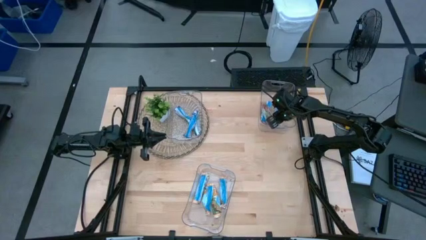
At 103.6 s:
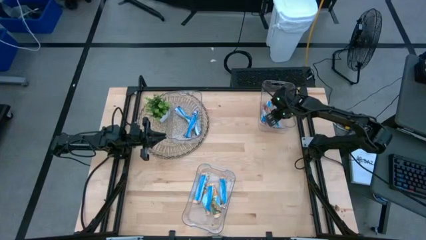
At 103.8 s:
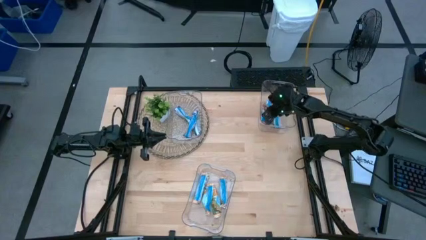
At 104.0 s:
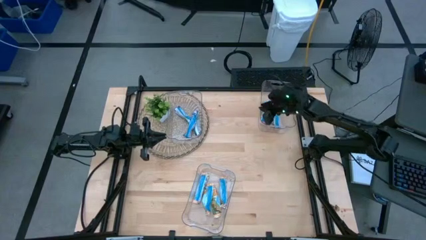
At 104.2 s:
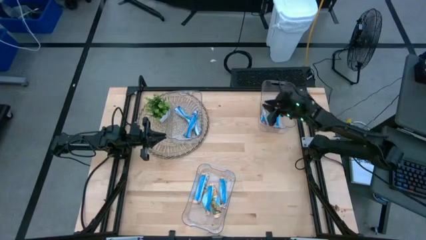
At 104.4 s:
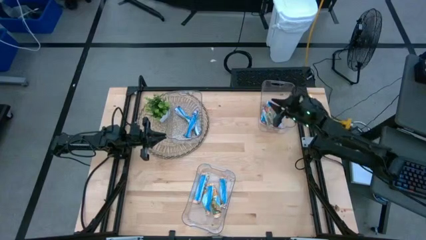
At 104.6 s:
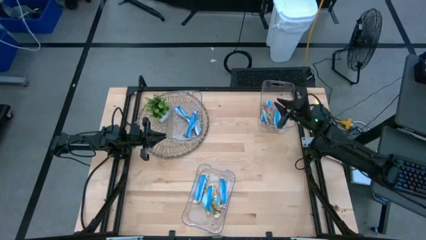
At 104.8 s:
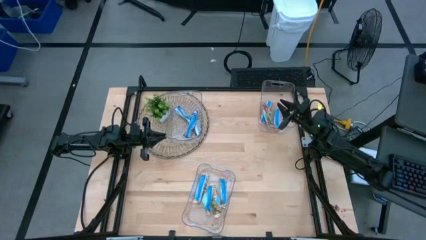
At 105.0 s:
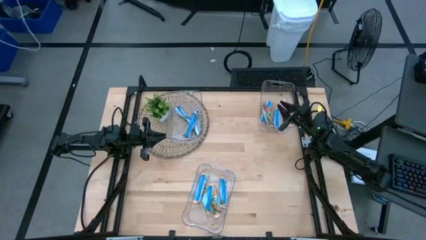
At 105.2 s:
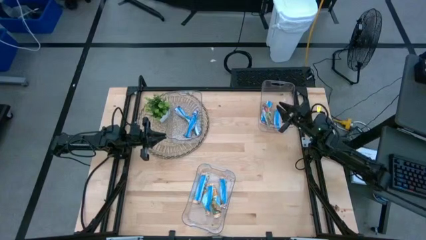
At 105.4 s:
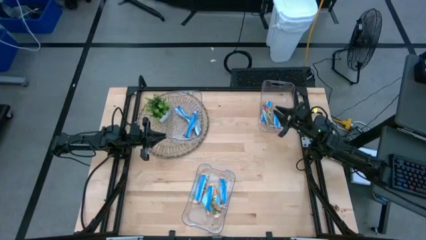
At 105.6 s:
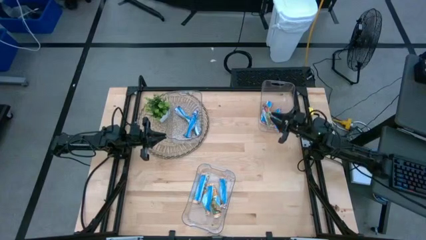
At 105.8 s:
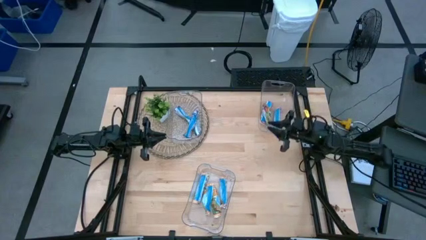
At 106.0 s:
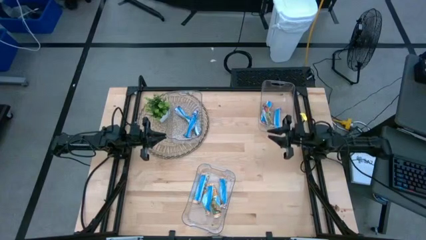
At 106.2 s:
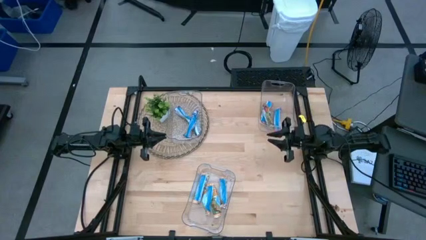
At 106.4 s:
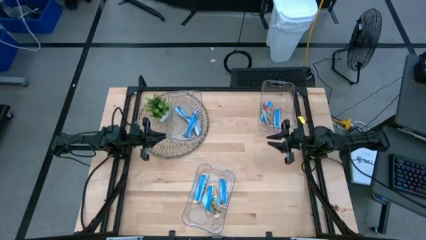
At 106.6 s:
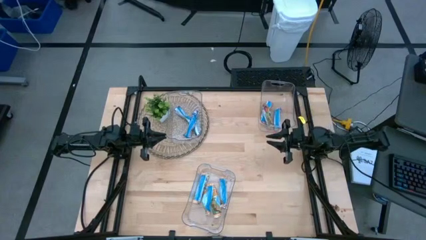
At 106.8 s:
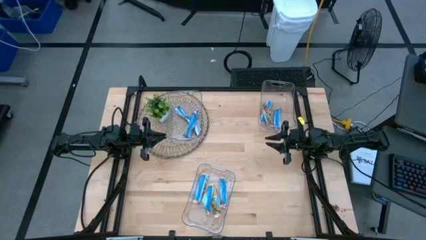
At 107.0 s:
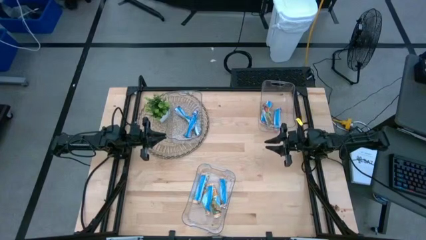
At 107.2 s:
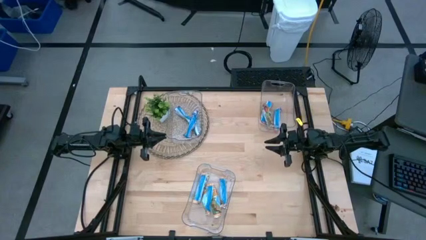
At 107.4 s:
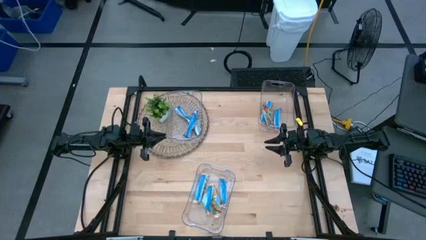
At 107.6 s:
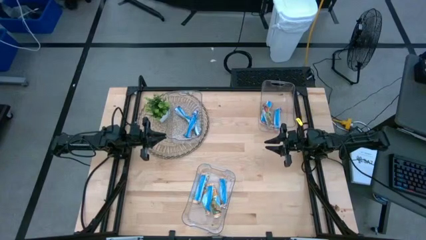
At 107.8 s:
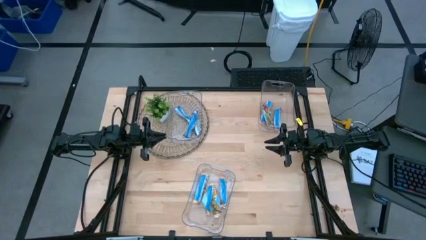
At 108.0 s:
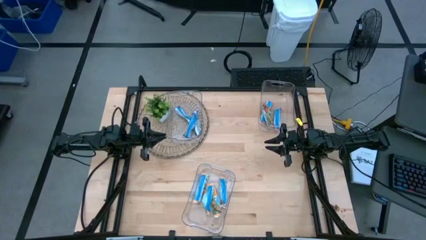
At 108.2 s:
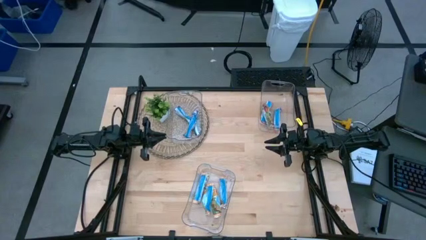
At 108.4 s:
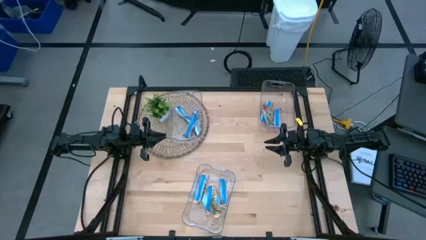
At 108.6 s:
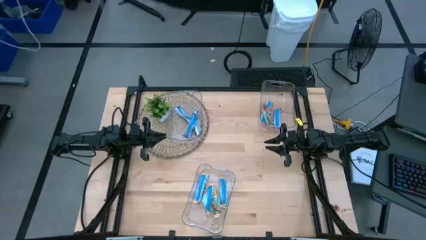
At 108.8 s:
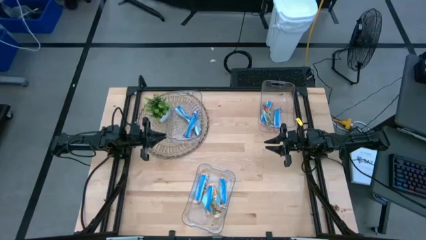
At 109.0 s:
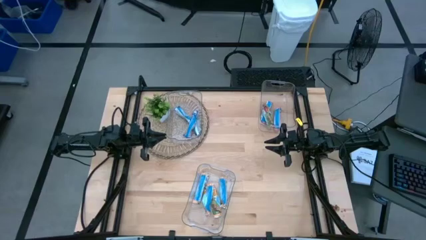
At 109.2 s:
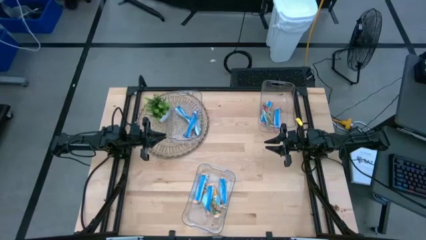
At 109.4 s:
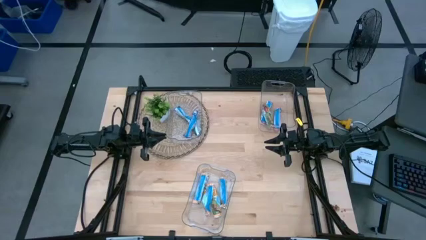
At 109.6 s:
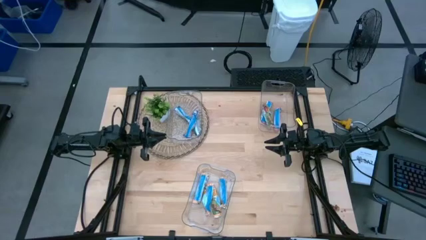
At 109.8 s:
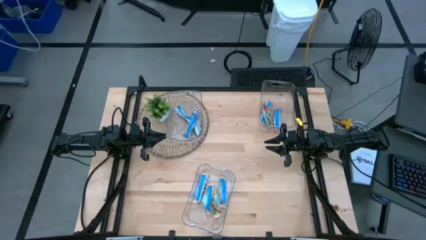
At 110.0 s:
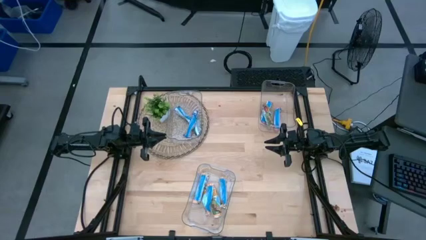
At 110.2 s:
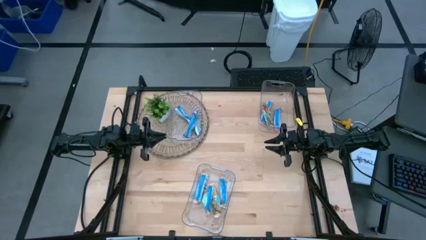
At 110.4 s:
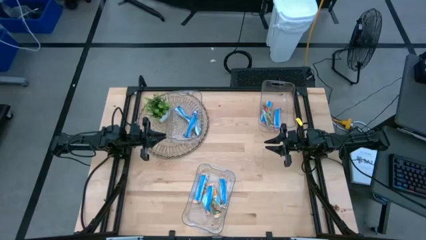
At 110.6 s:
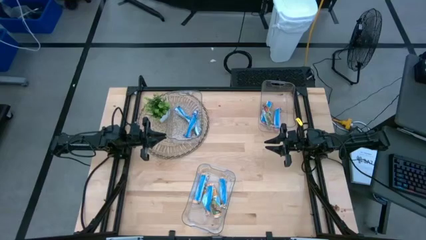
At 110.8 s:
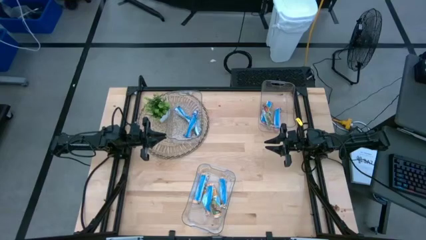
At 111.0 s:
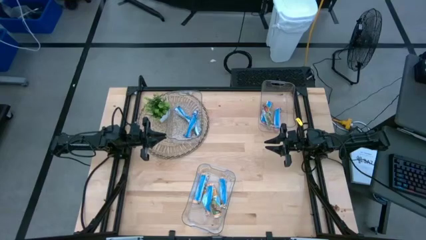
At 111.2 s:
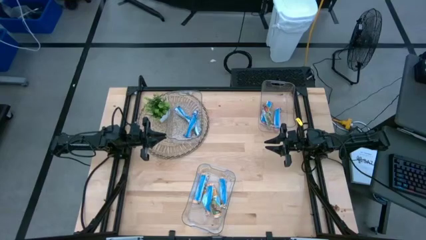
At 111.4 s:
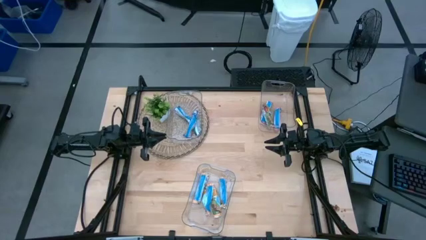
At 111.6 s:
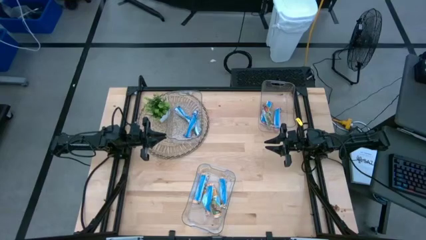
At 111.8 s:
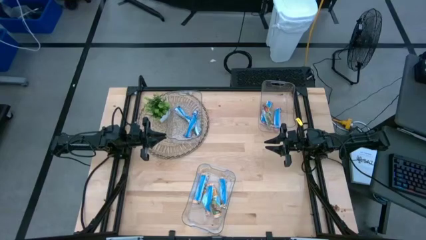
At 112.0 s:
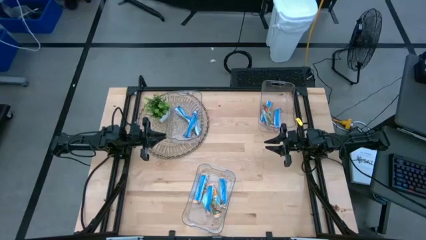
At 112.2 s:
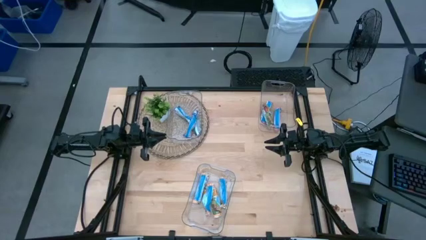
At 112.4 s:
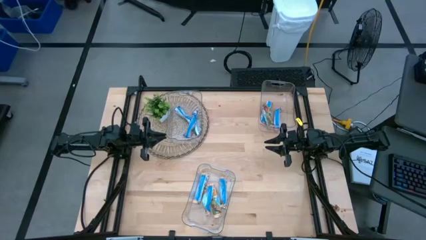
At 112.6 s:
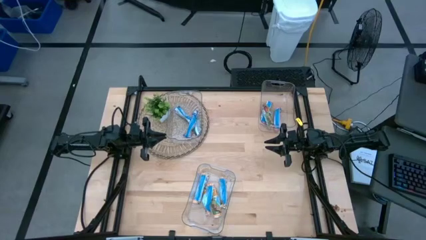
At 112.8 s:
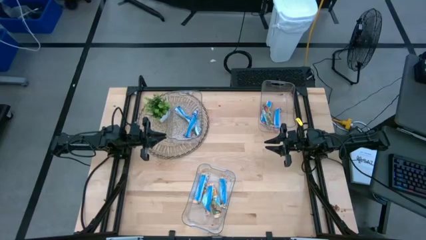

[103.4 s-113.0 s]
Task: Pick and place Granola Bars by type
Return to Home Position
